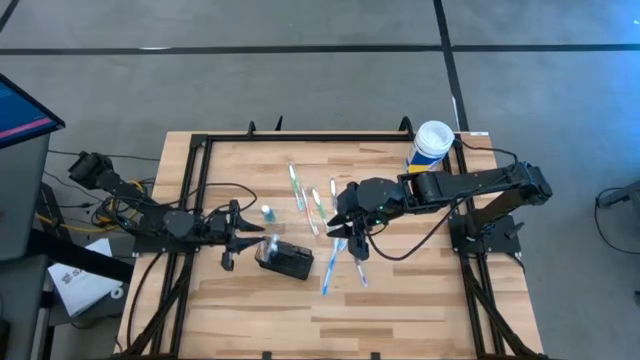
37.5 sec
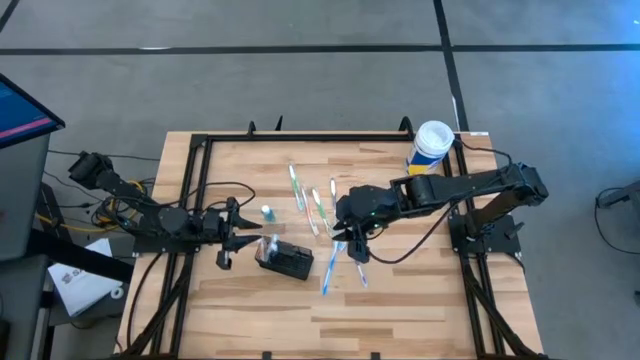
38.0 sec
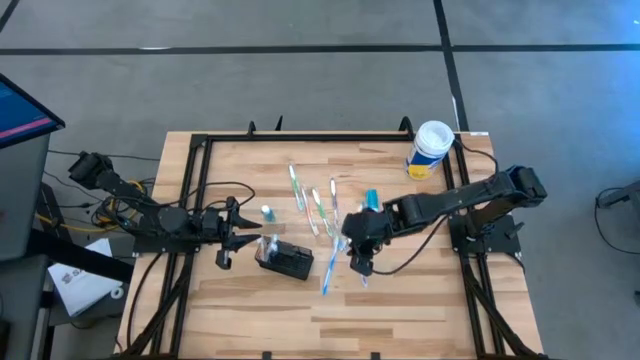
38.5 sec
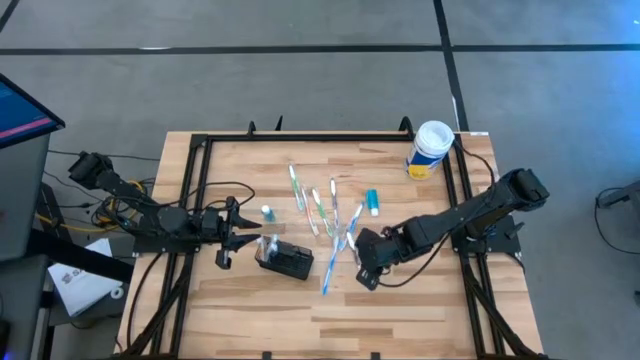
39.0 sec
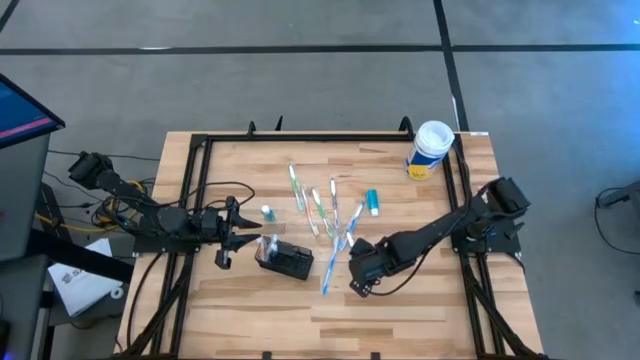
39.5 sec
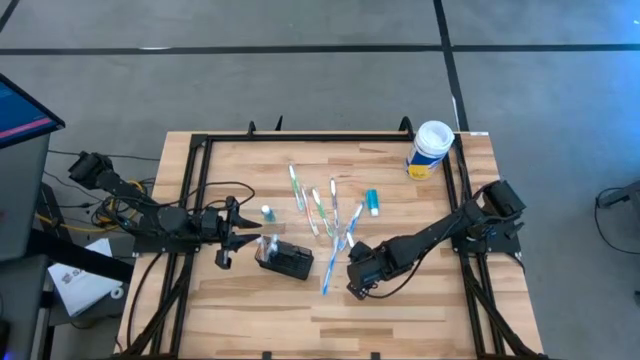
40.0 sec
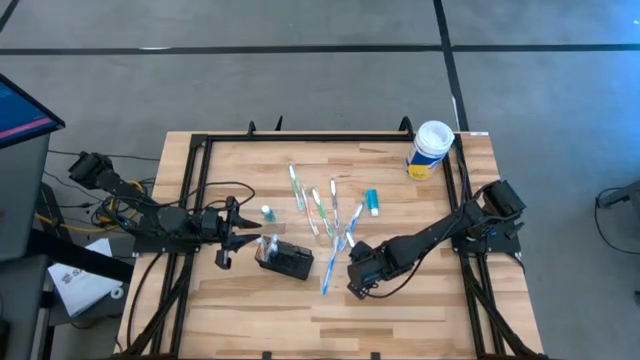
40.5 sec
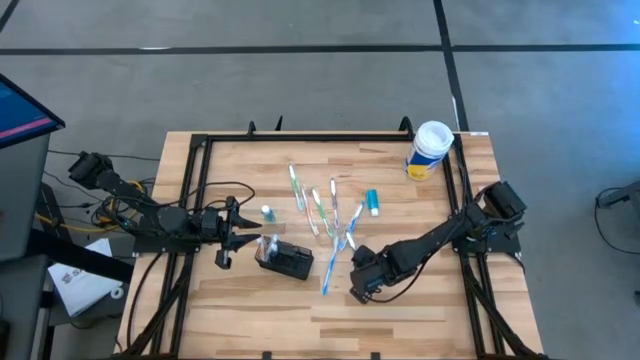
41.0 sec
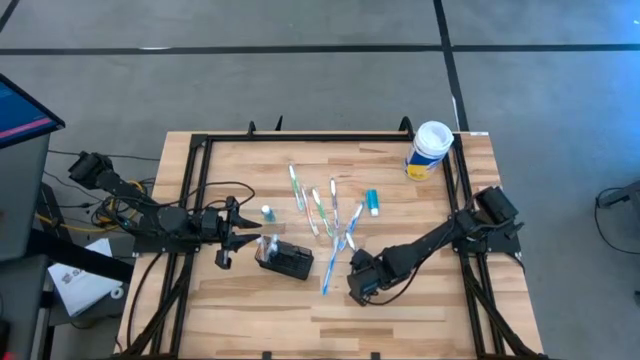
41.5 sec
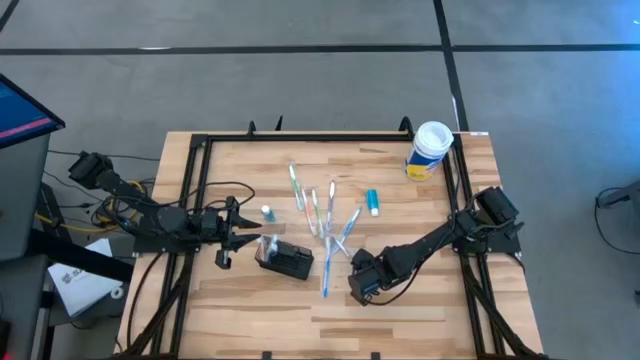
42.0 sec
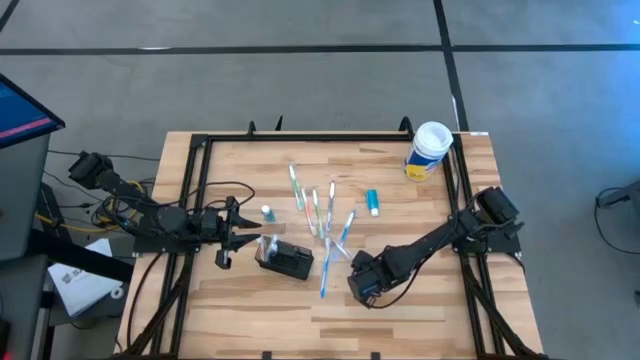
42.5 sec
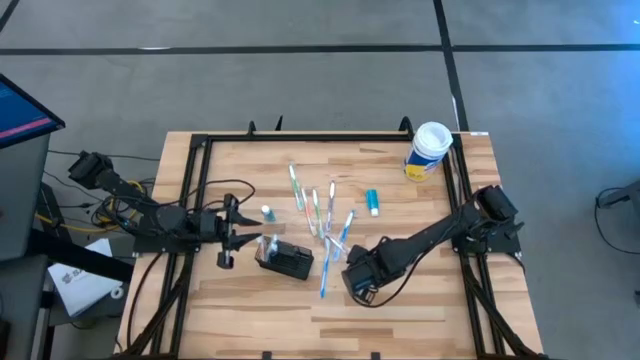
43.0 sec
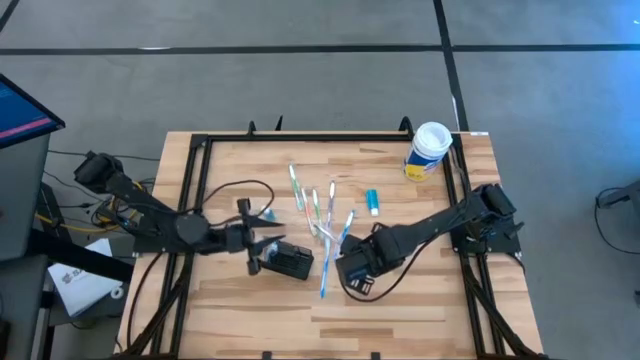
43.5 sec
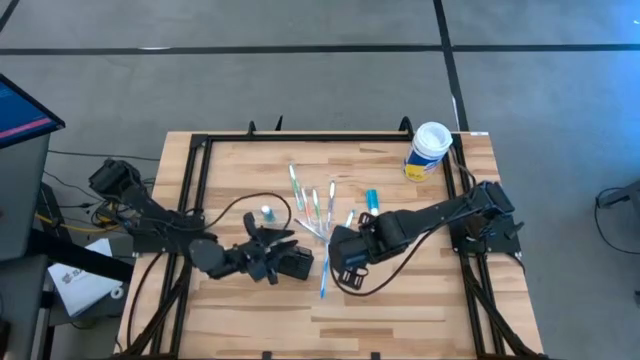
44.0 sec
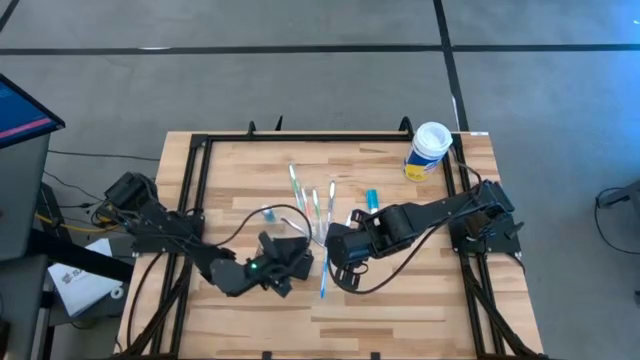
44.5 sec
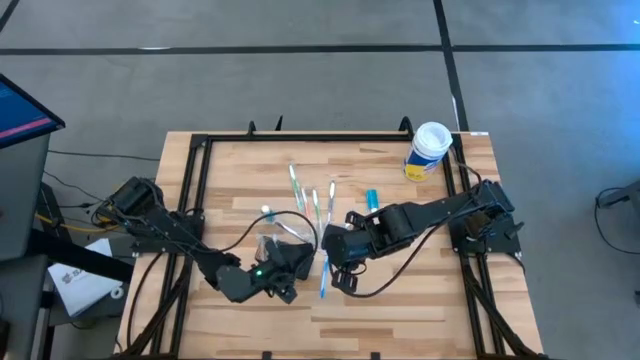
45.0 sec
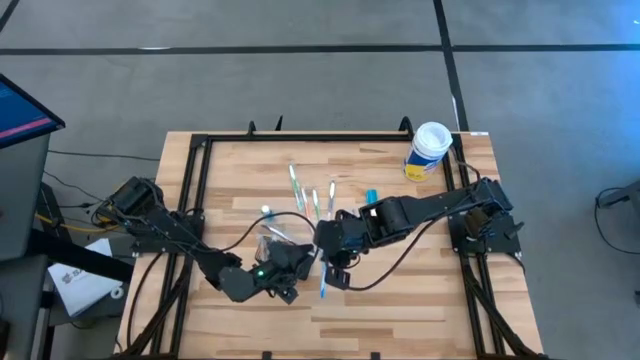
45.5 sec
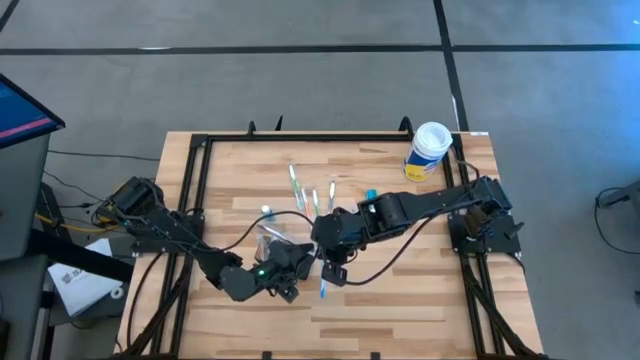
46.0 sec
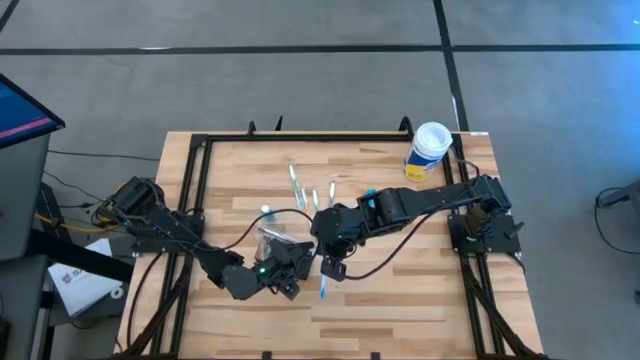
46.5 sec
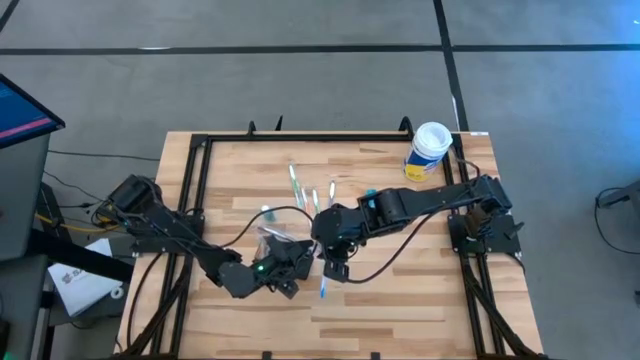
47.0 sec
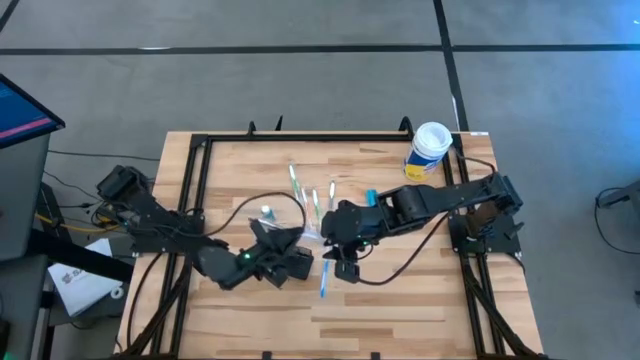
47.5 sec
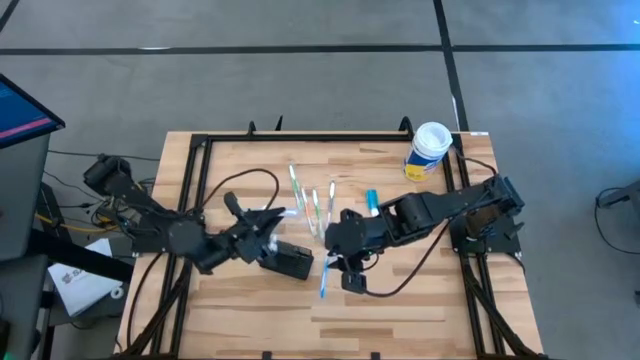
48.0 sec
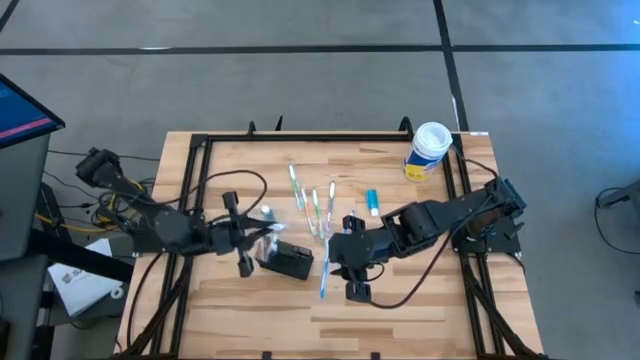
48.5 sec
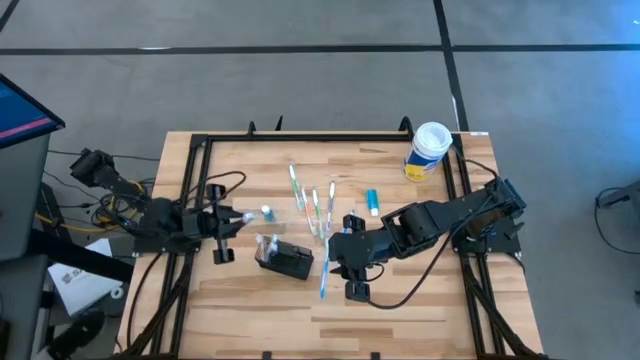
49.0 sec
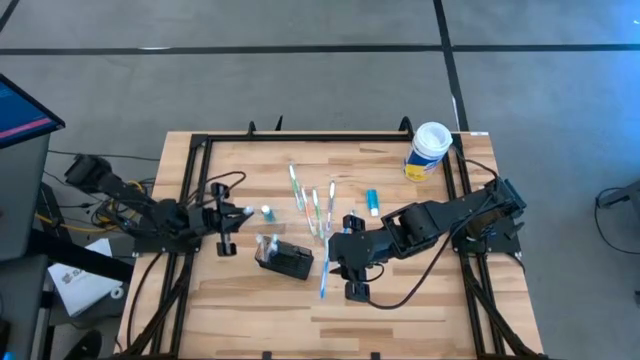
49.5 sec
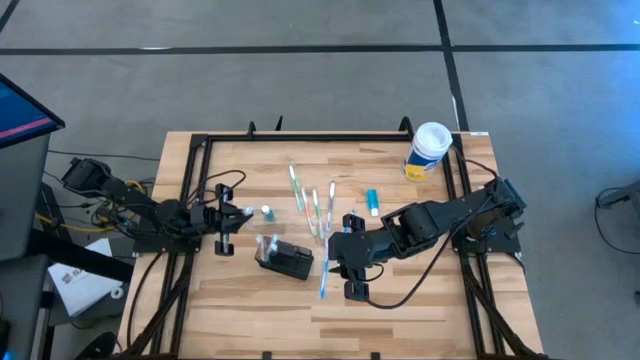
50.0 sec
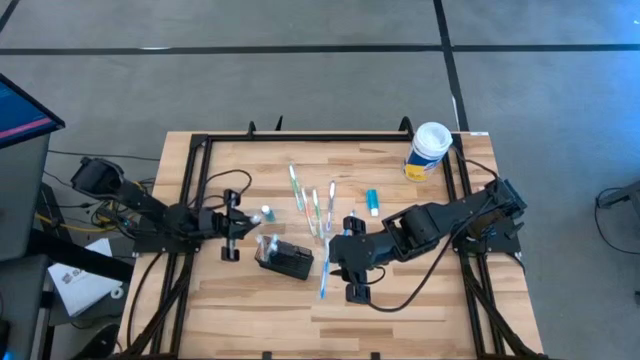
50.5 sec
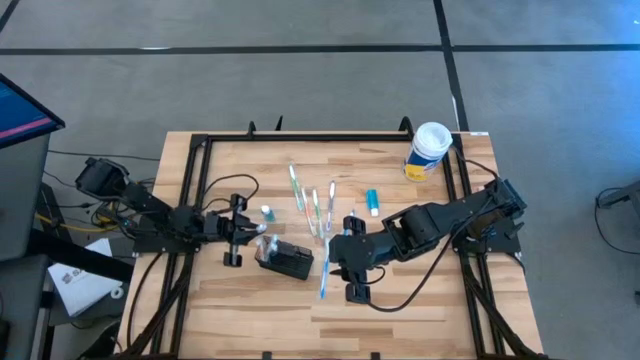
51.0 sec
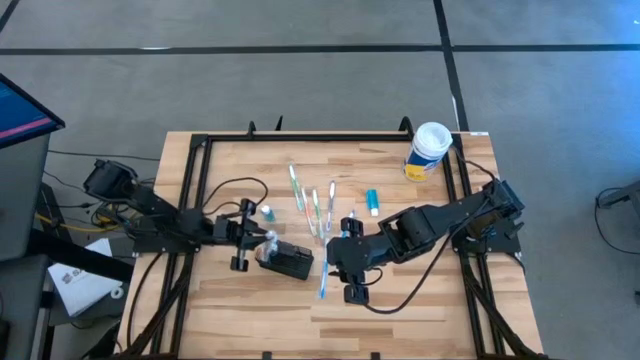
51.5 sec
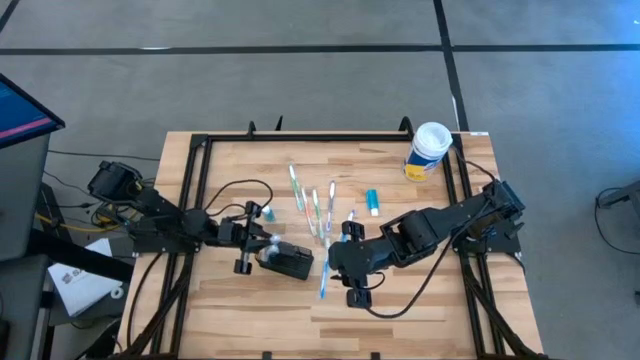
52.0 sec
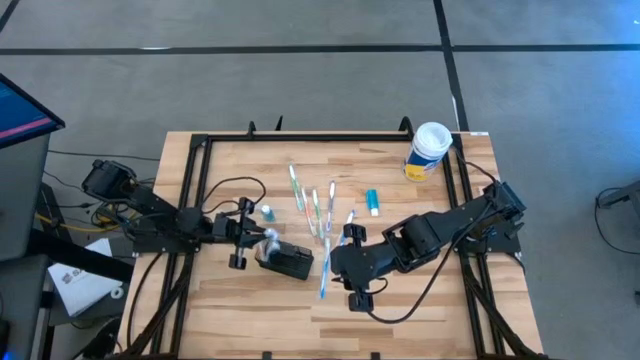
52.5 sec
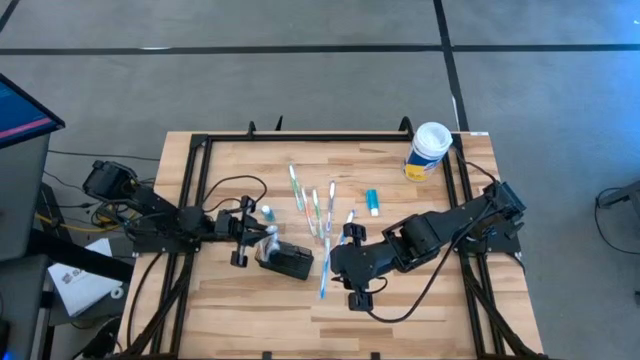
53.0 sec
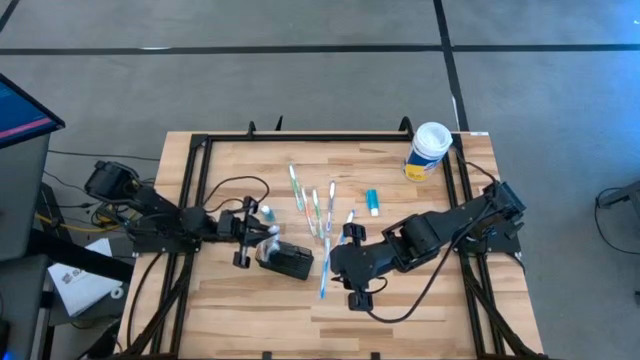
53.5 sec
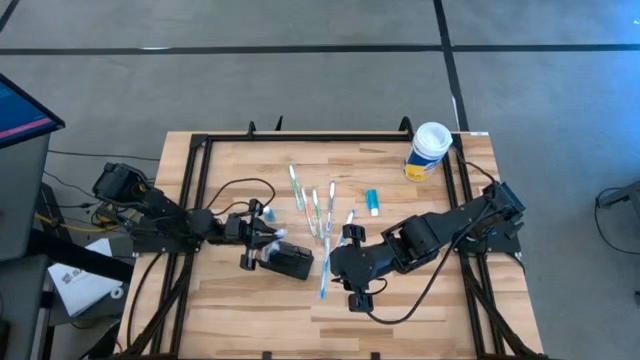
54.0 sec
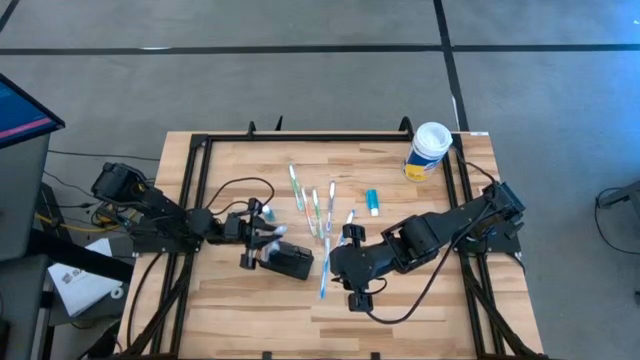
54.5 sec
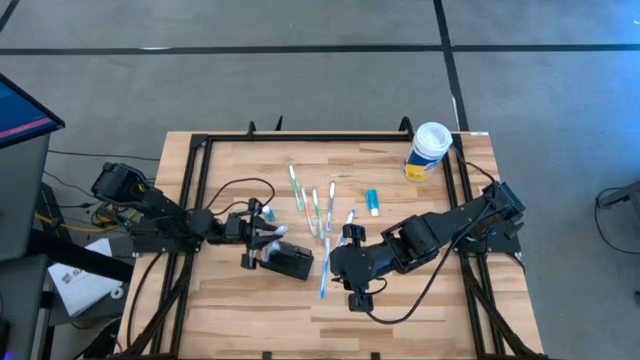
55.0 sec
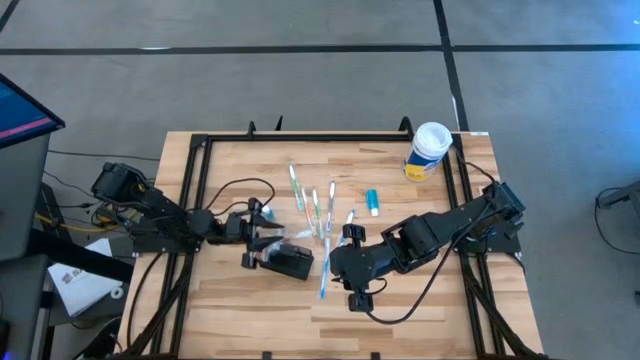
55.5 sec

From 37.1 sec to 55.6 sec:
Task: Pick & Place toothbrushing station
Put the bottom purple toothbrush into the wire organizer

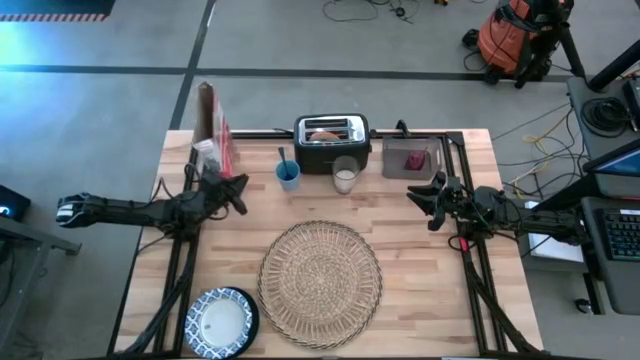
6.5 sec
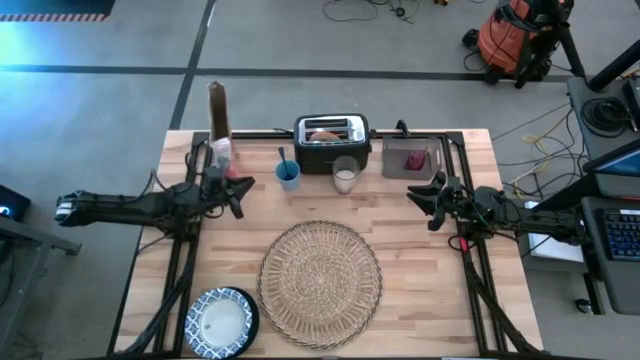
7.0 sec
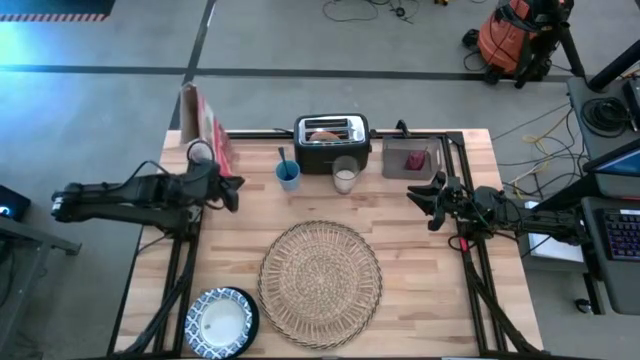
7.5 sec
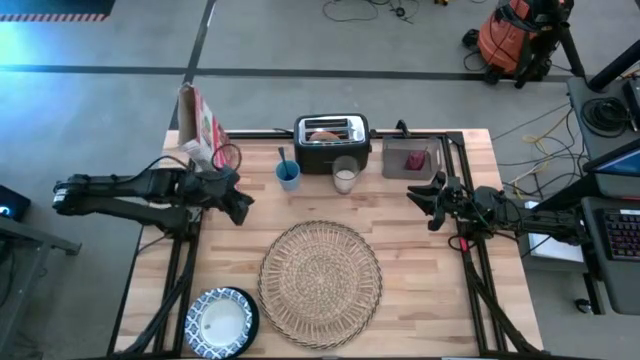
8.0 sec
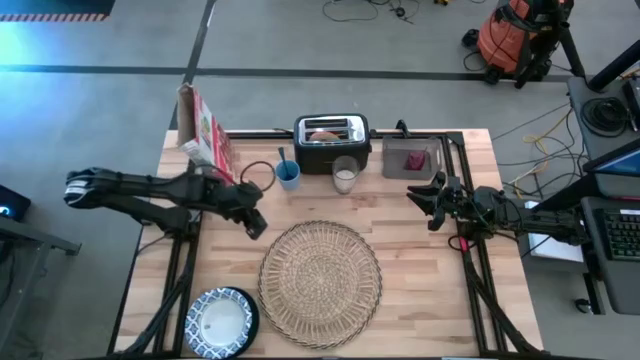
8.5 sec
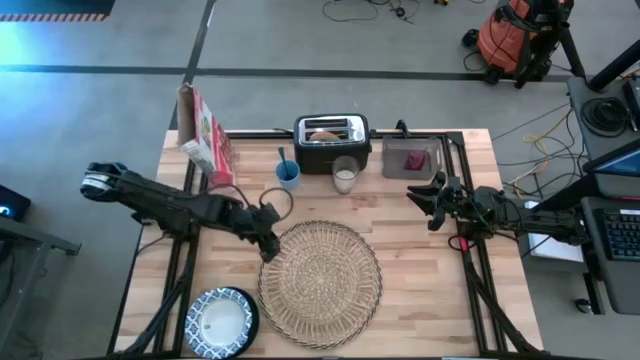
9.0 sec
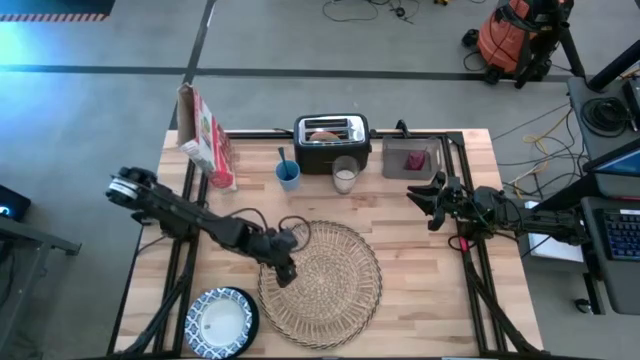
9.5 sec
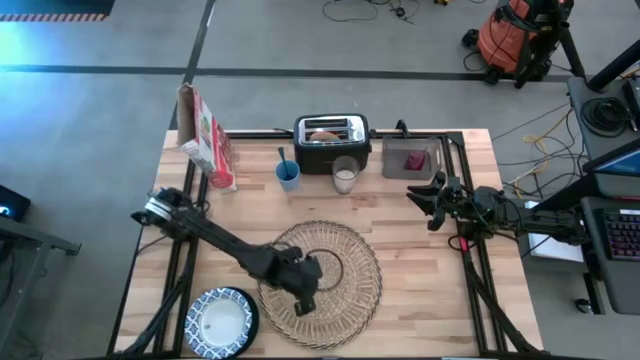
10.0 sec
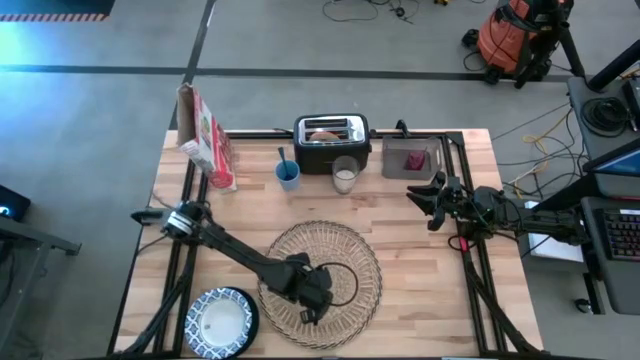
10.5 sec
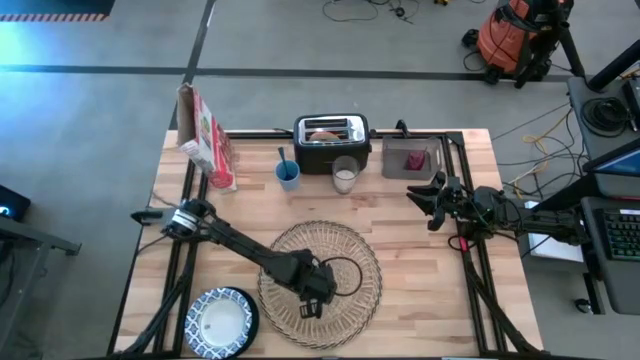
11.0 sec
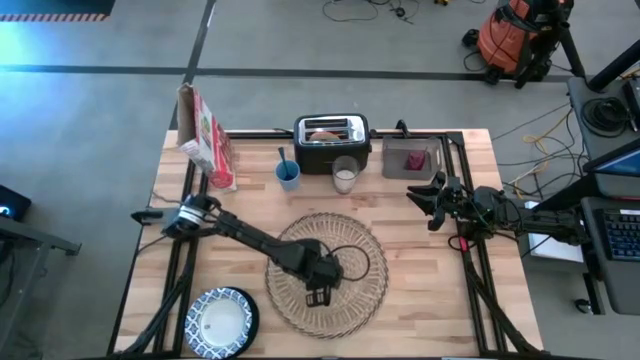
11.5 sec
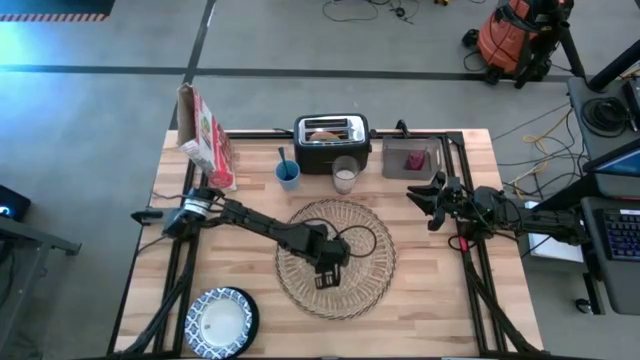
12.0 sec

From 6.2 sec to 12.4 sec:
Task: Arrange a breakfast setting
Move the brown mat to the center of the table
